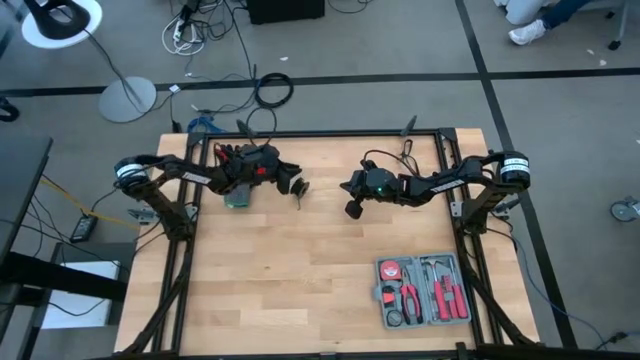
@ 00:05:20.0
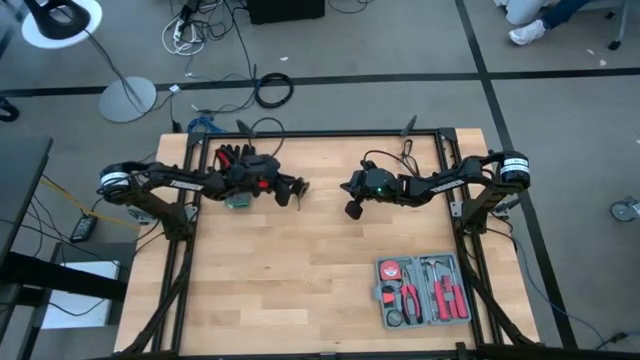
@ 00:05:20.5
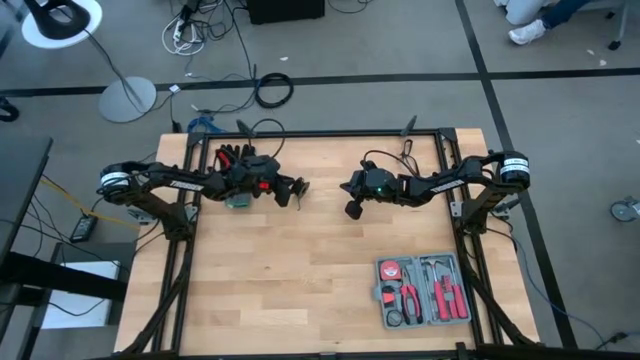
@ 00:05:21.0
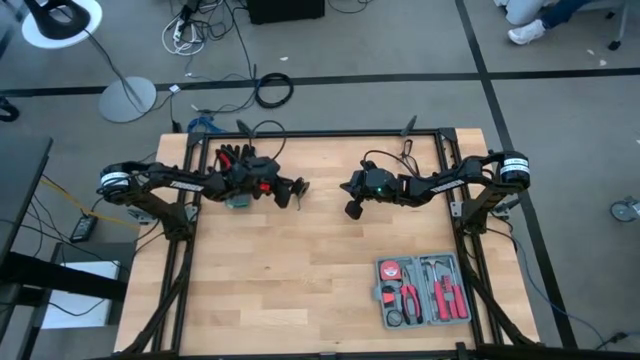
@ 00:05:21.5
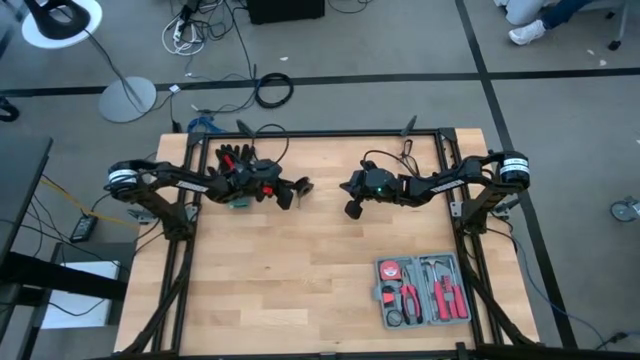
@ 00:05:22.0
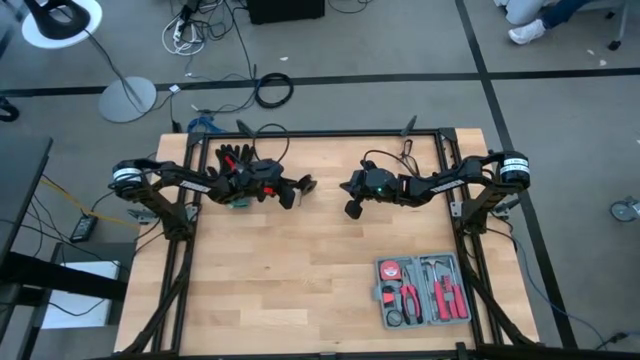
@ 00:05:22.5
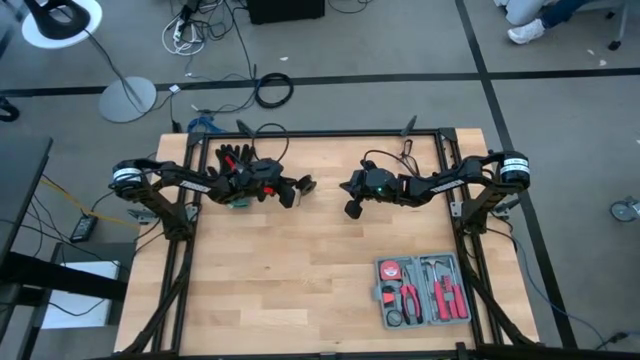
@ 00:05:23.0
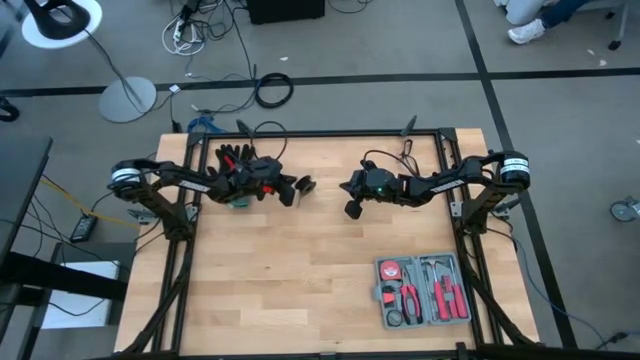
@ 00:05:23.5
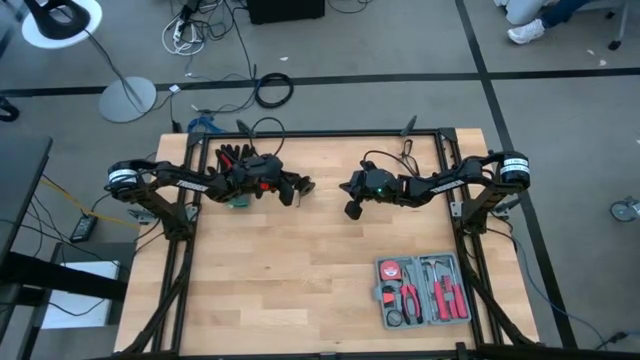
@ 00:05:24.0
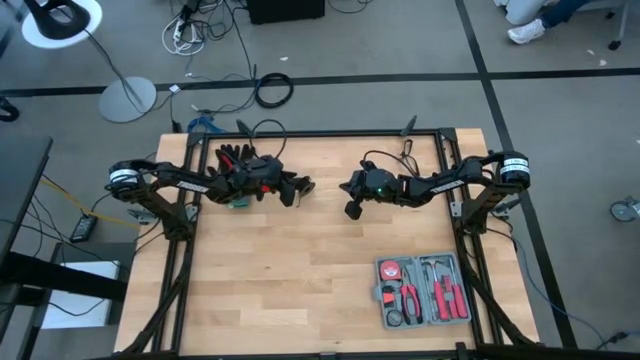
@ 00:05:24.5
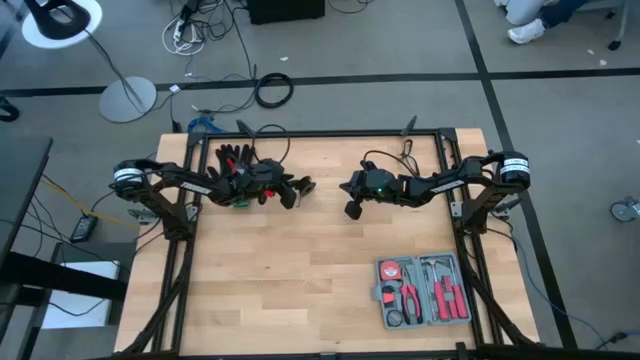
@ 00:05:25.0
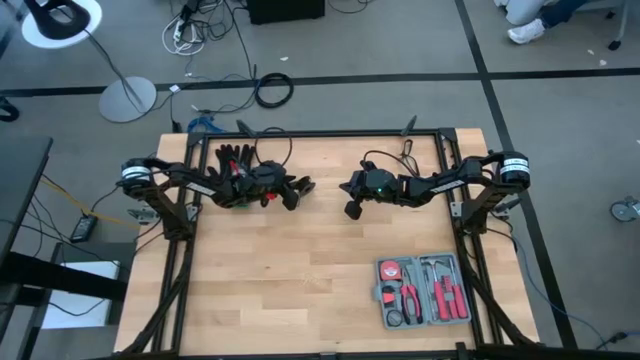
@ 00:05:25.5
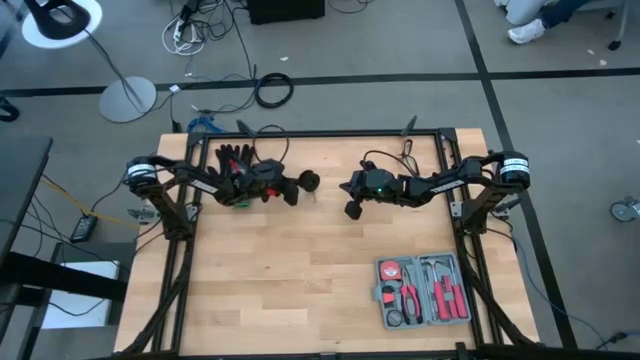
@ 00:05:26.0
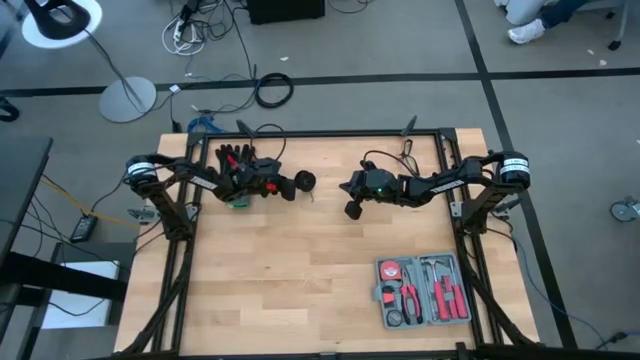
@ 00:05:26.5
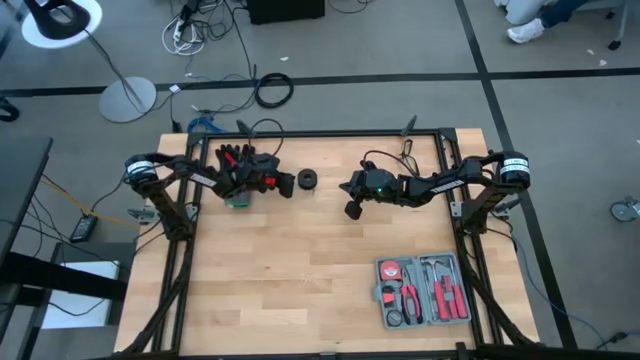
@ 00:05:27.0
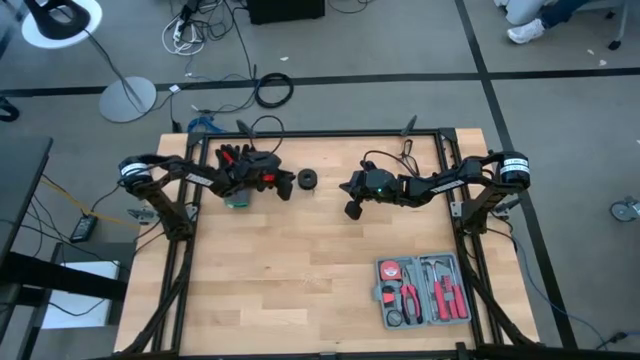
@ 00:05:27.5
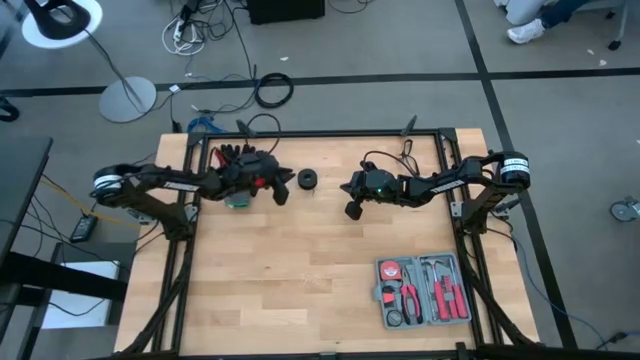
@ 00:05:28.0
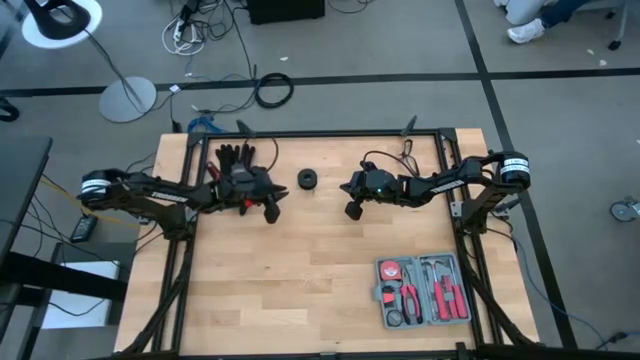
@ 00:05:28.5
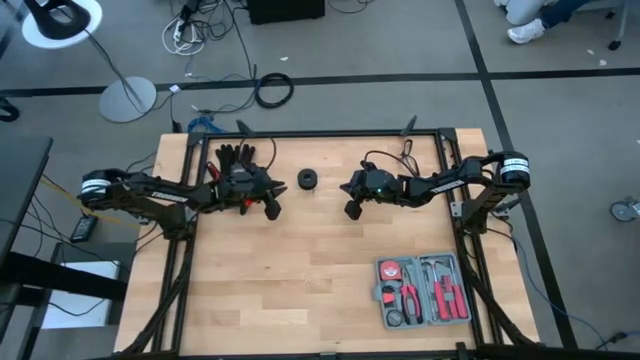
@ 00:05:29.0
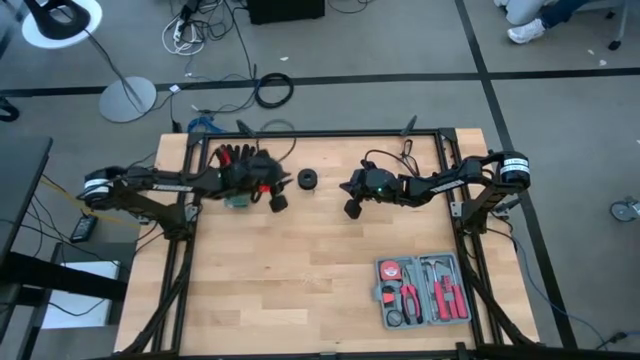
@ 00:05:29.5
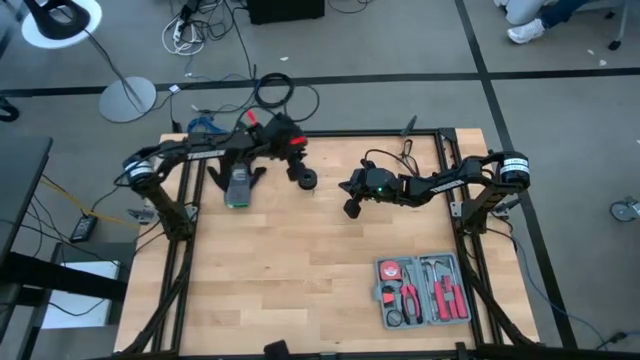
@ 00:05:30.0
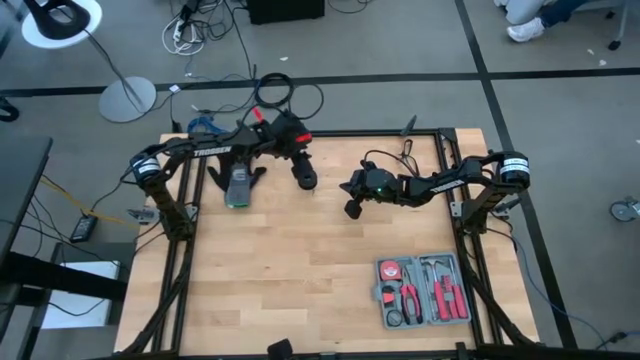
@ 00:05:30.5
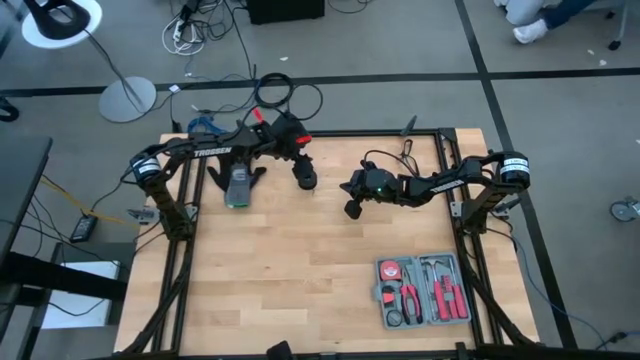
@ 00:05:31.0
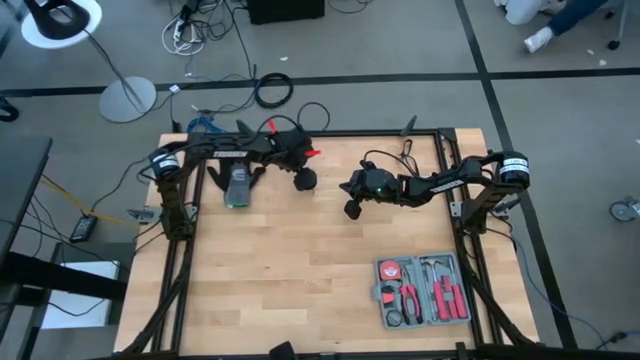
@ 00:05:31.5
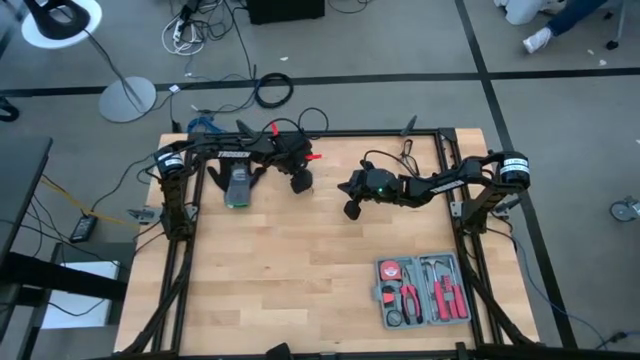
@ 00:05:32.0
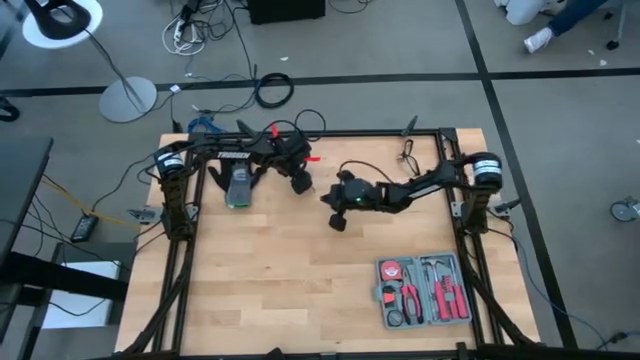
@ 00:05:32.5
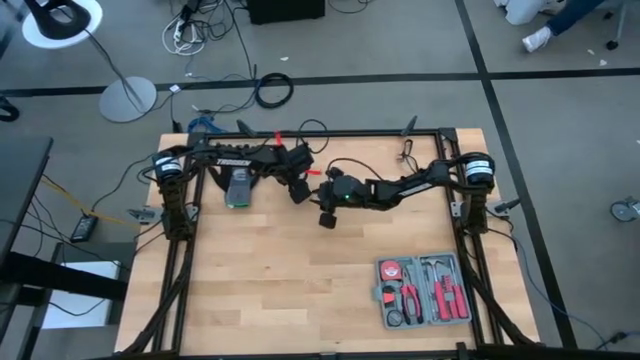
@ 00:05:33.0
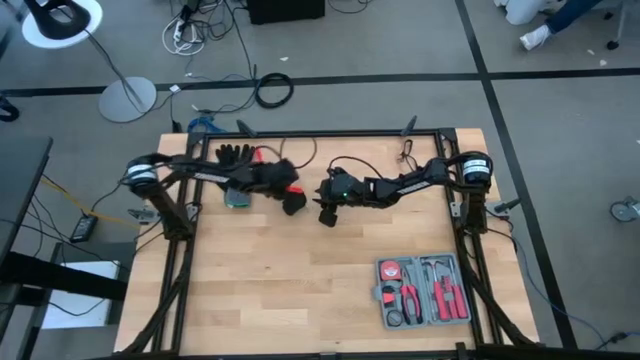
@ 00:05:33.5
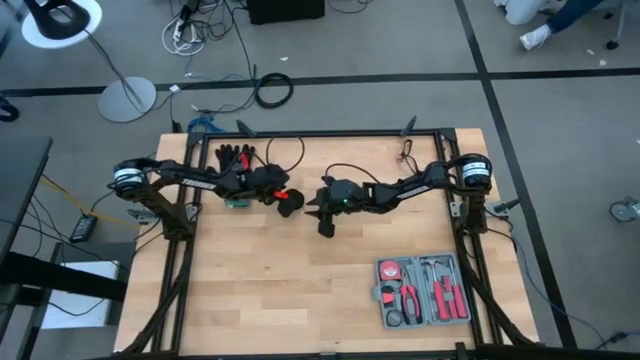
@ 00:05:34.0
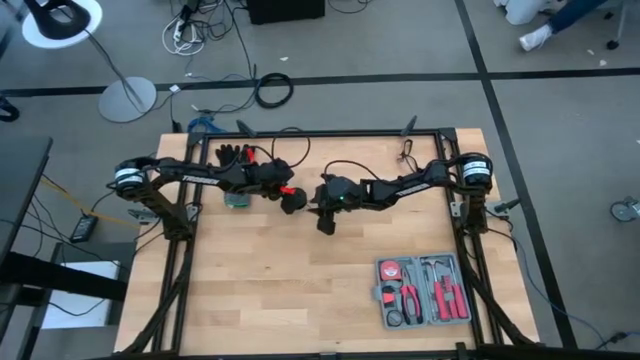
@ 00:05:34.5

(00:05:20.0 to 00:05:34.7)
Task: Coil cords
Uncoil the black wire from the spool

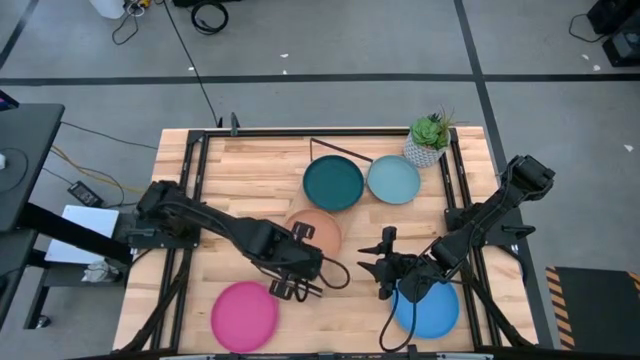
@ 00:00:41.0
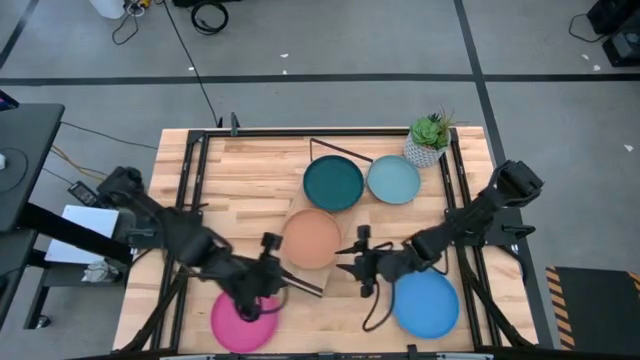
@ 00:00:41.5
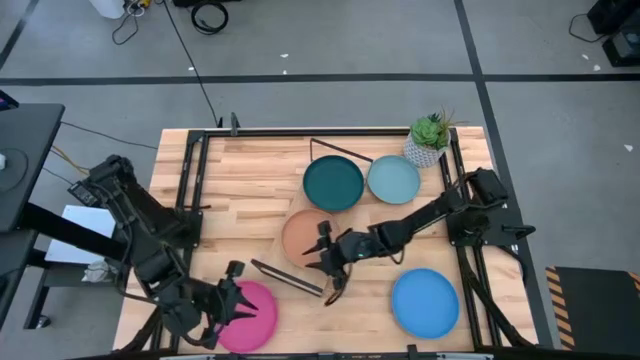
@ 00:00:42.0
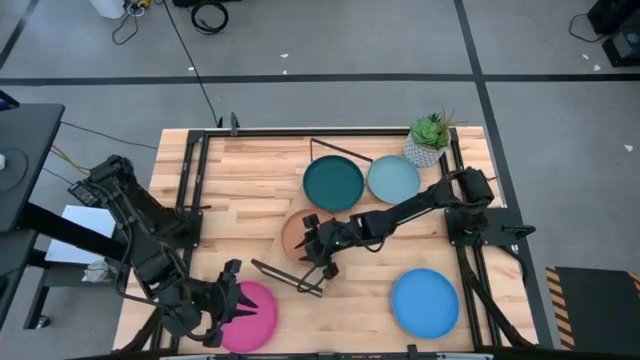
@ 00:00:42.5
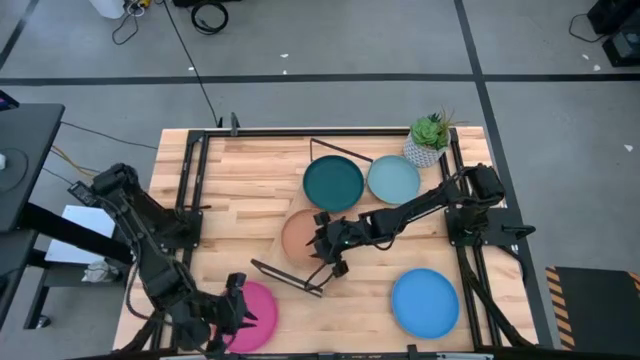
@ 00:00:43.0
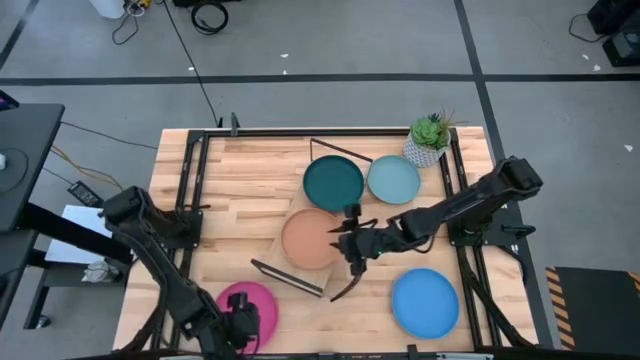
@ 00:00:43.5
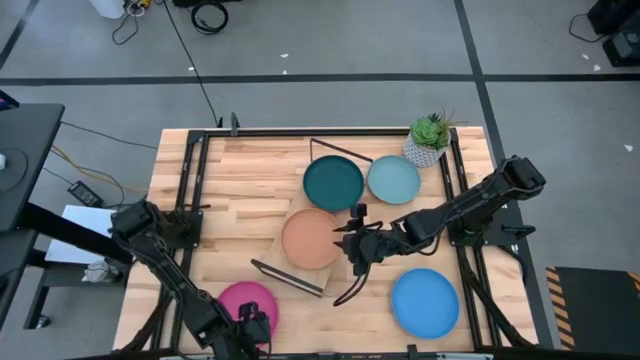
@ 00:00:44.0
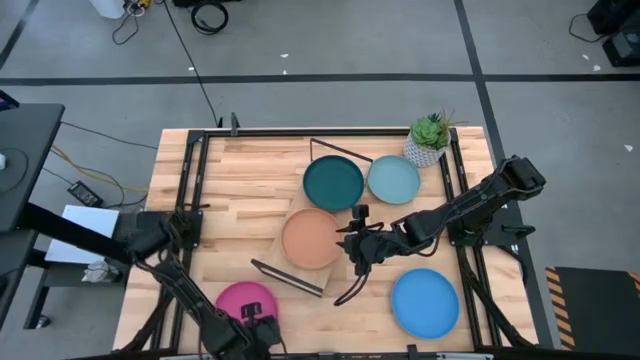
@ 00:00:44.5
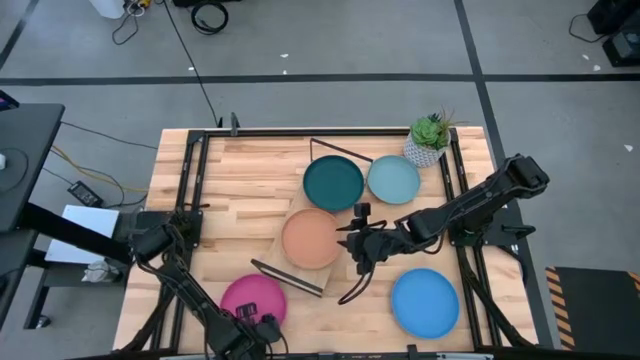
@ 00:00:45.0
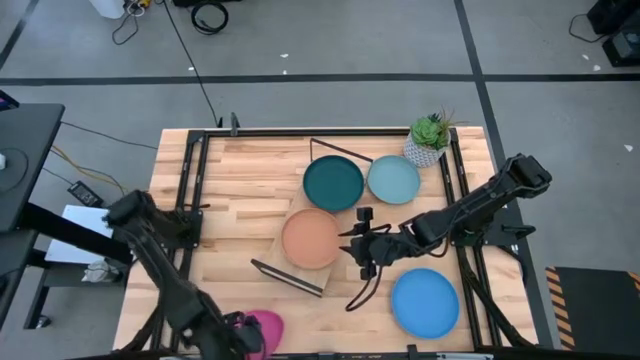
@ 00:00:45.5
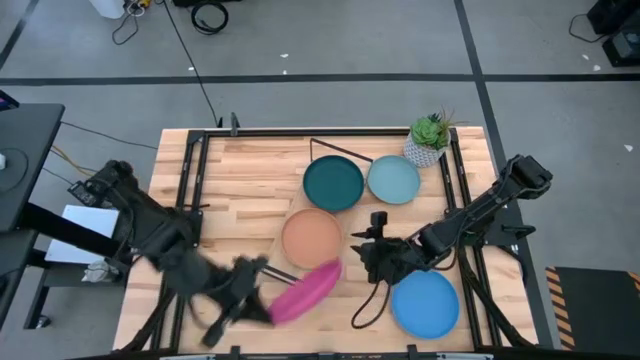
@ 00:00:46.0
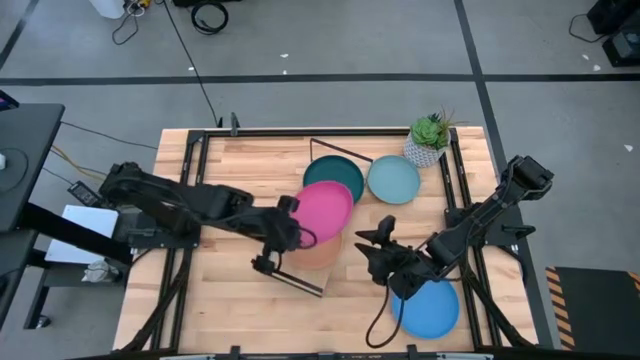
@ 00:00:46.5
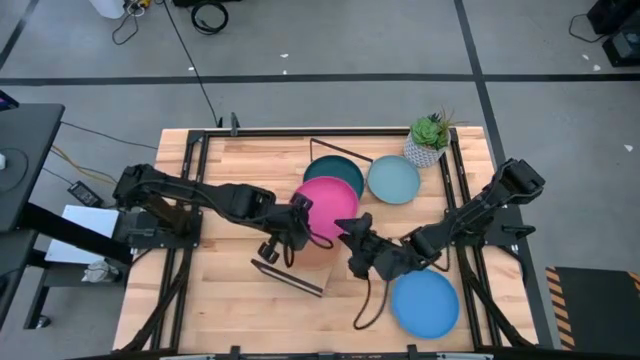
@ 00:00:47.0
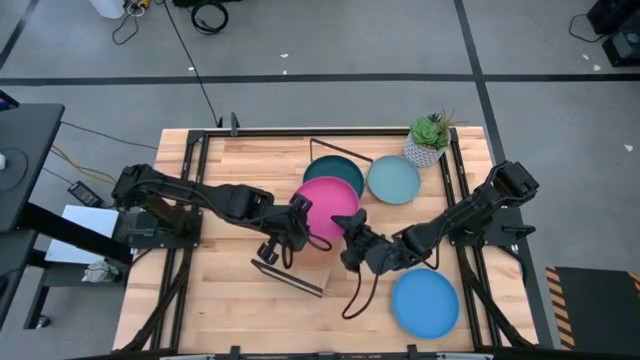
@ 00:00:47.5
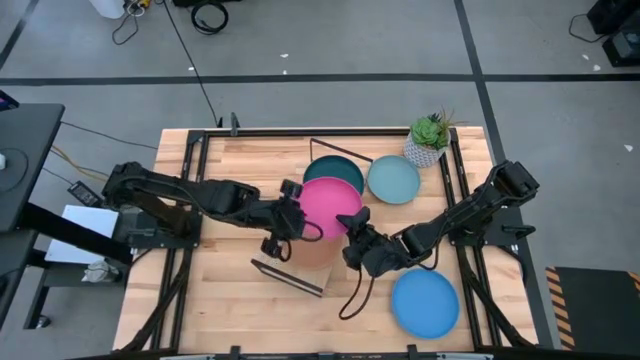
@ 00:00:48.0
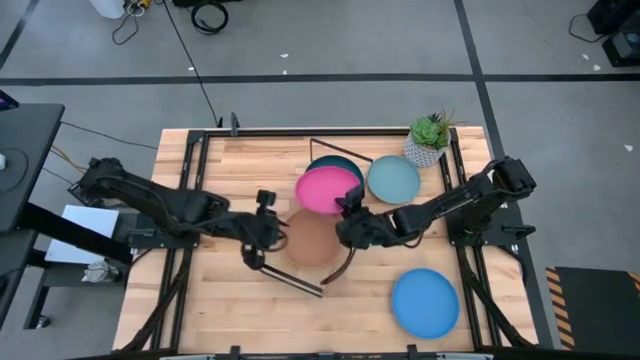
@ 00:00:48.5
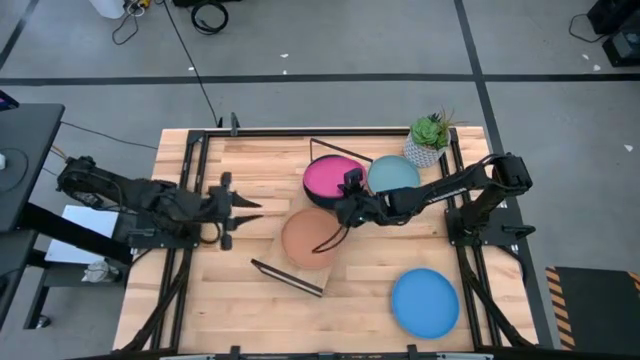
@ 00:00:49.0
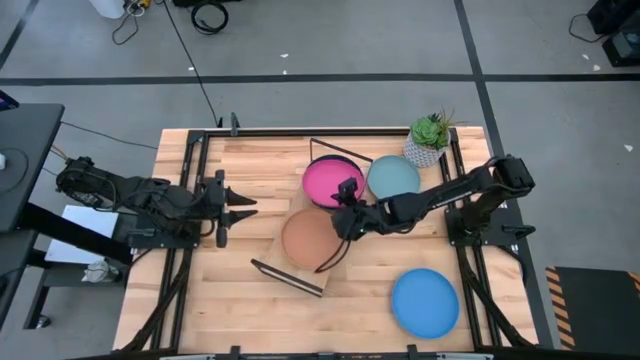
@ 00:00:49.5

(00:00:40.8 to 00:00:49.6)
Task: Place and stack plates onto a shelf
Stack the pink plate on the dark green plate
